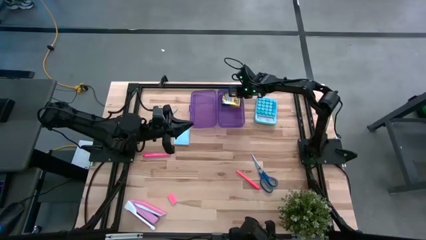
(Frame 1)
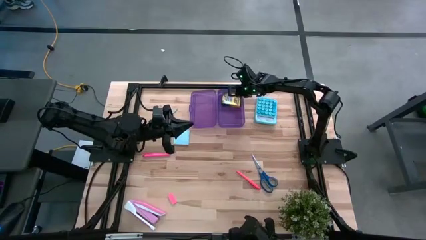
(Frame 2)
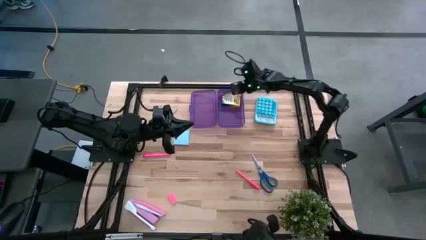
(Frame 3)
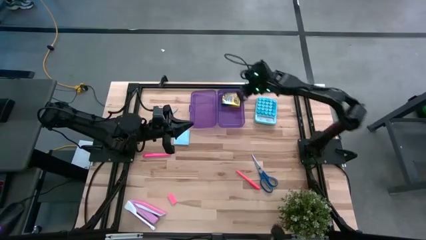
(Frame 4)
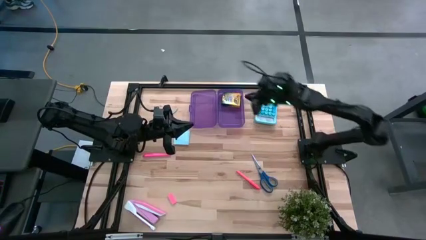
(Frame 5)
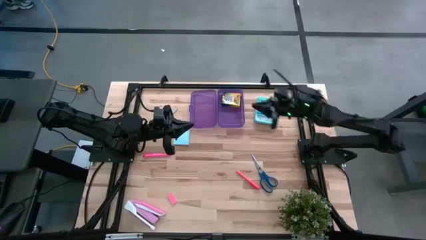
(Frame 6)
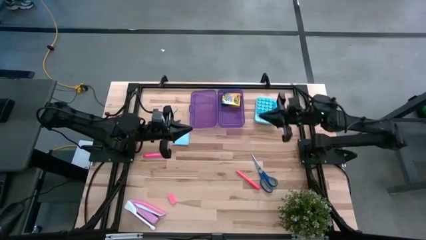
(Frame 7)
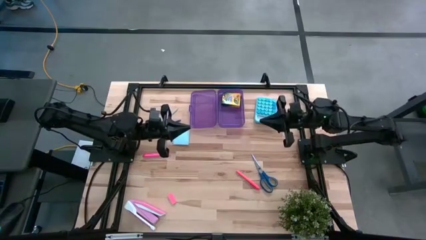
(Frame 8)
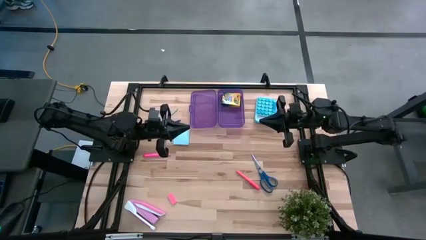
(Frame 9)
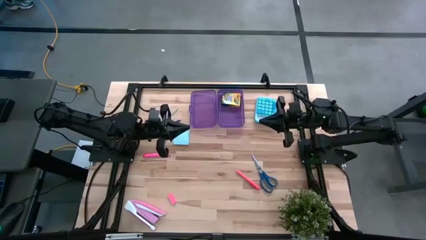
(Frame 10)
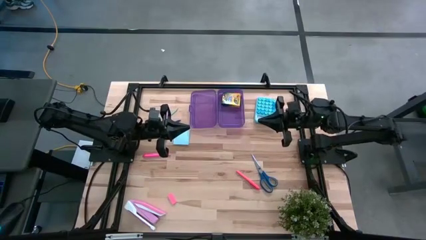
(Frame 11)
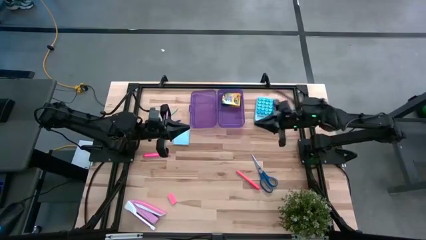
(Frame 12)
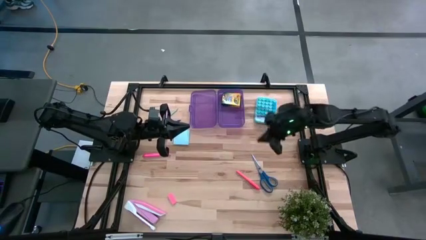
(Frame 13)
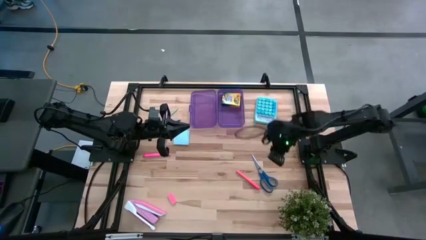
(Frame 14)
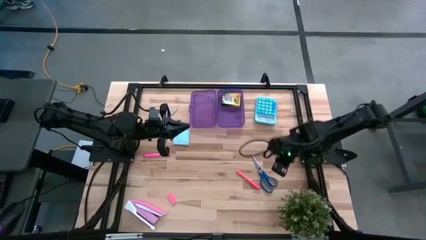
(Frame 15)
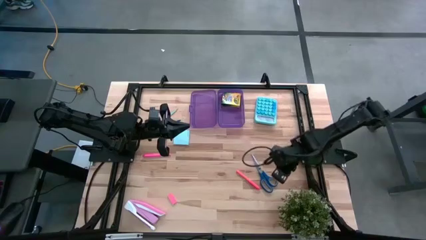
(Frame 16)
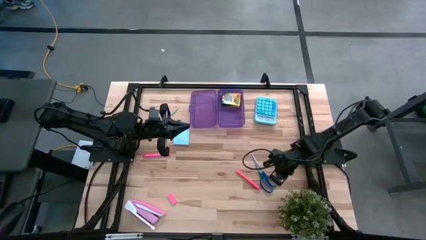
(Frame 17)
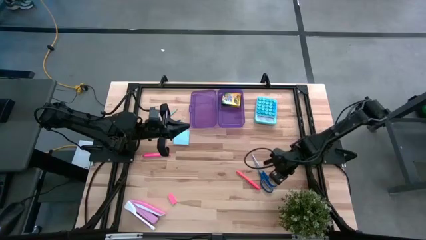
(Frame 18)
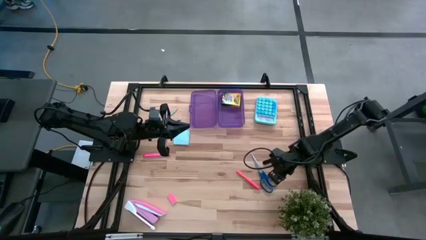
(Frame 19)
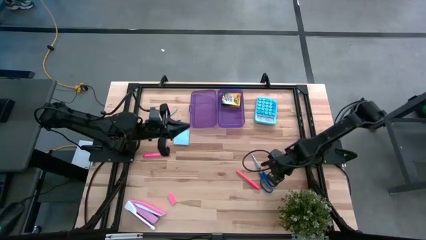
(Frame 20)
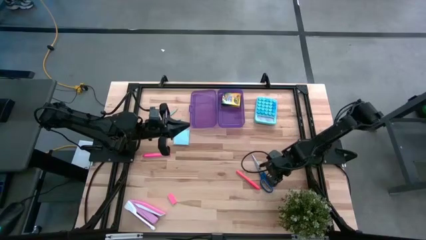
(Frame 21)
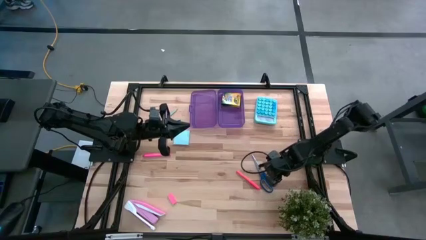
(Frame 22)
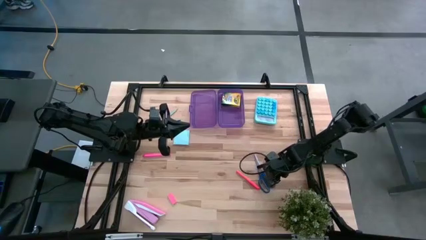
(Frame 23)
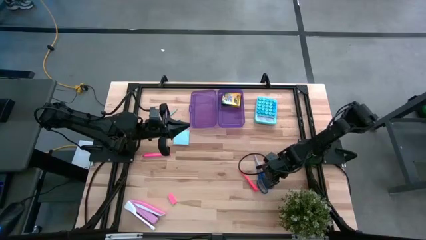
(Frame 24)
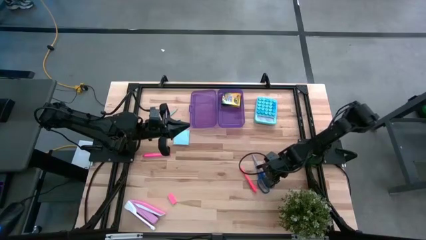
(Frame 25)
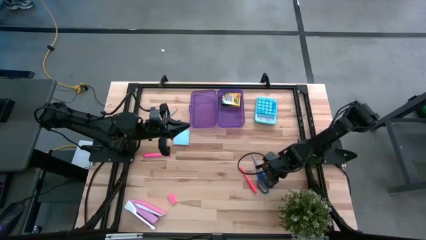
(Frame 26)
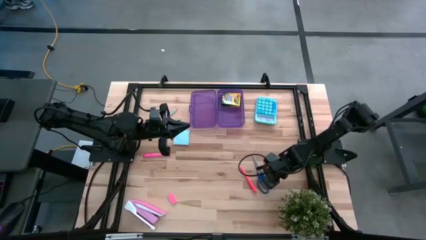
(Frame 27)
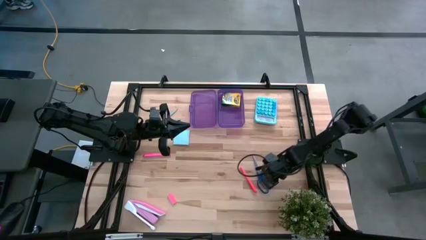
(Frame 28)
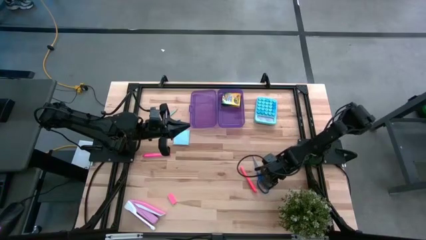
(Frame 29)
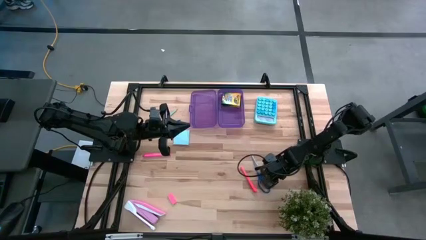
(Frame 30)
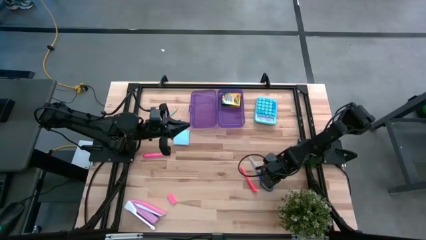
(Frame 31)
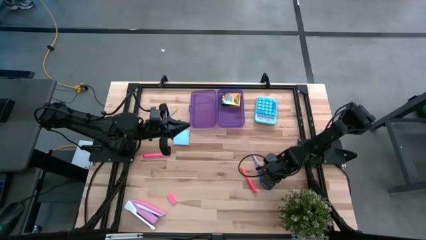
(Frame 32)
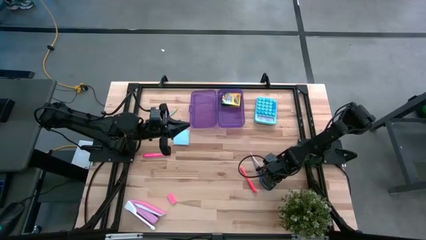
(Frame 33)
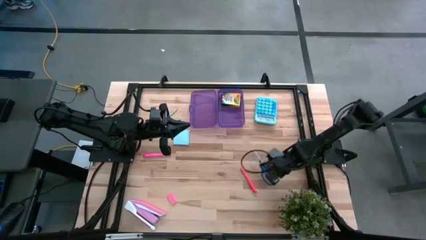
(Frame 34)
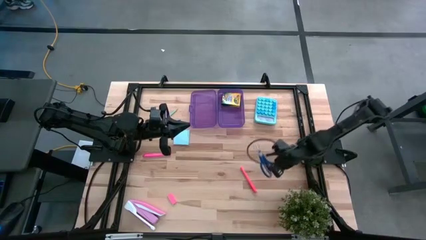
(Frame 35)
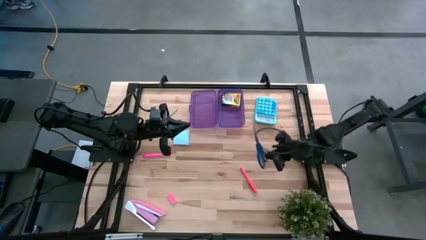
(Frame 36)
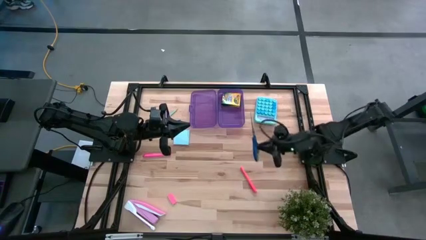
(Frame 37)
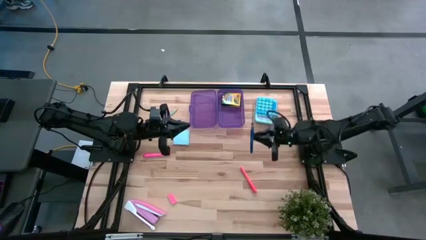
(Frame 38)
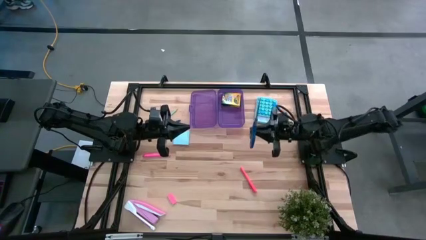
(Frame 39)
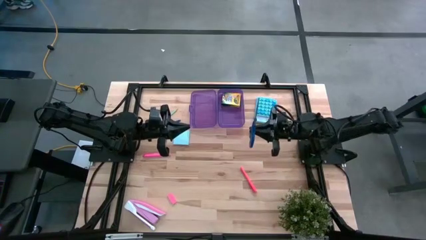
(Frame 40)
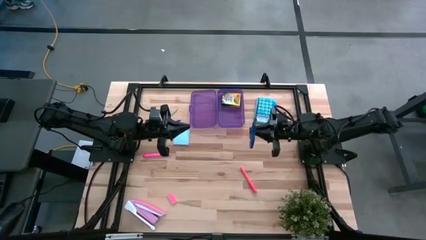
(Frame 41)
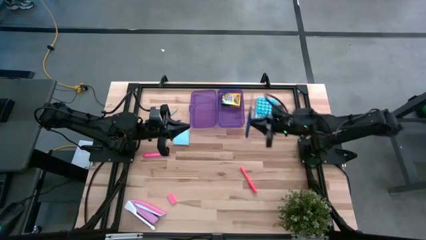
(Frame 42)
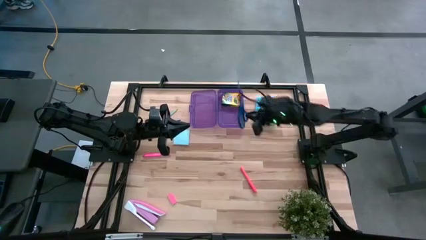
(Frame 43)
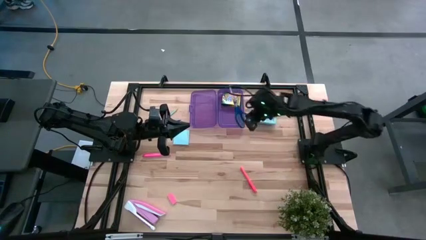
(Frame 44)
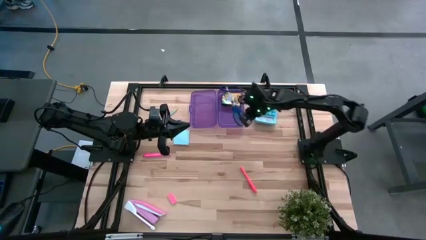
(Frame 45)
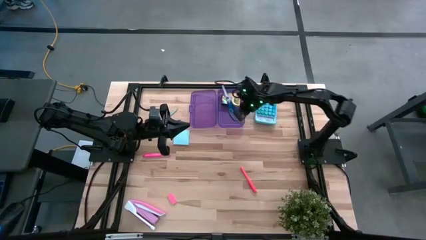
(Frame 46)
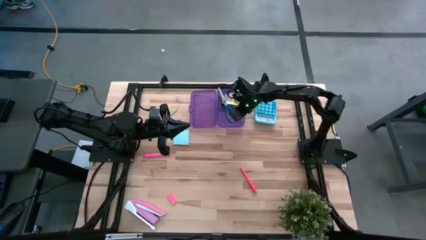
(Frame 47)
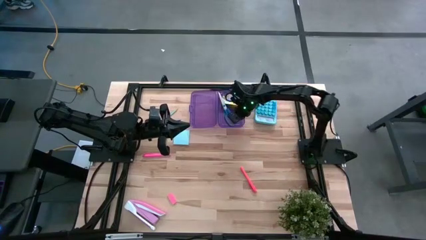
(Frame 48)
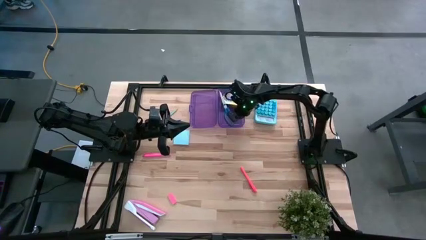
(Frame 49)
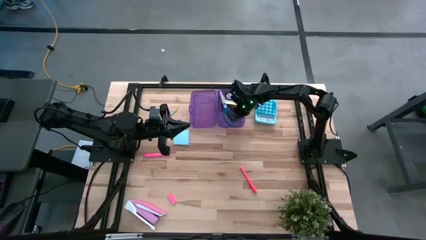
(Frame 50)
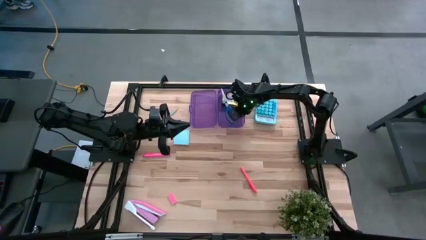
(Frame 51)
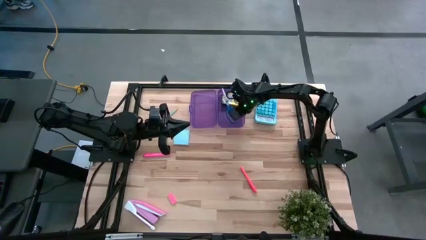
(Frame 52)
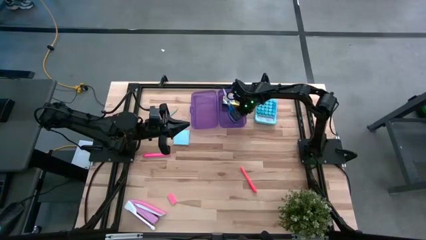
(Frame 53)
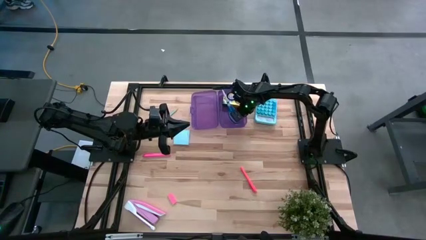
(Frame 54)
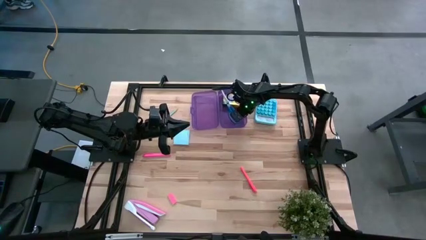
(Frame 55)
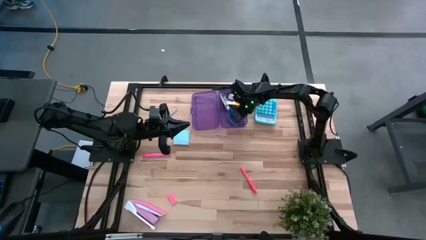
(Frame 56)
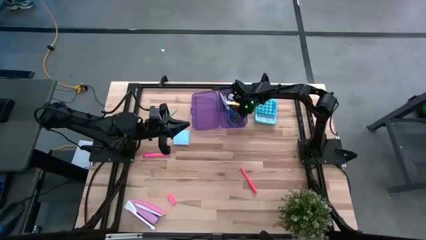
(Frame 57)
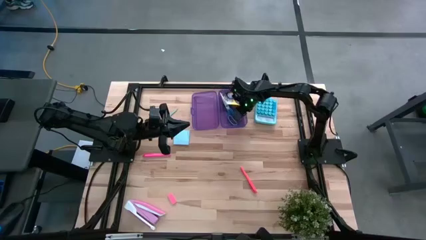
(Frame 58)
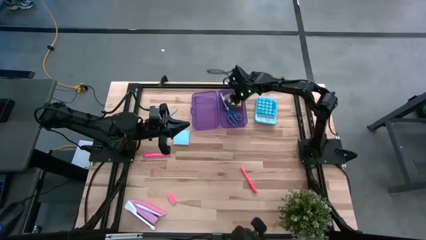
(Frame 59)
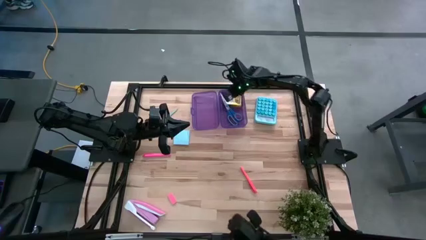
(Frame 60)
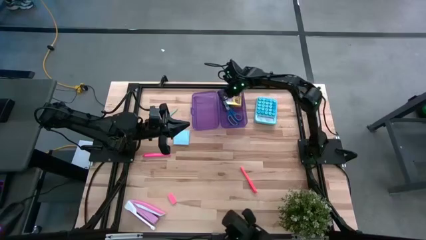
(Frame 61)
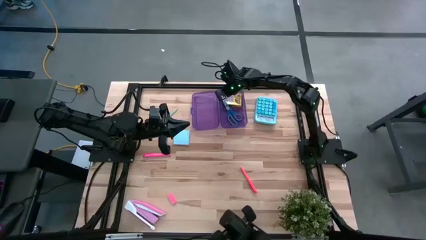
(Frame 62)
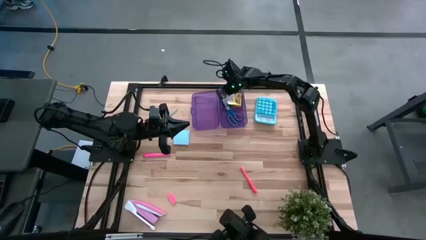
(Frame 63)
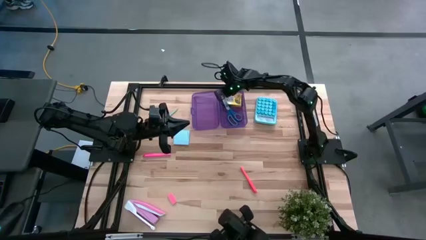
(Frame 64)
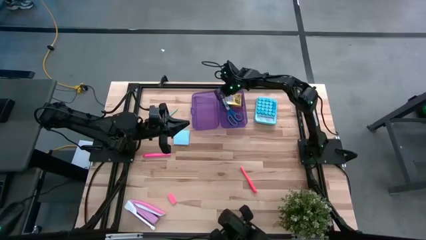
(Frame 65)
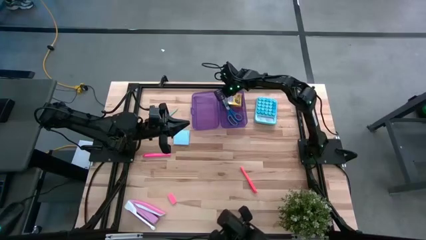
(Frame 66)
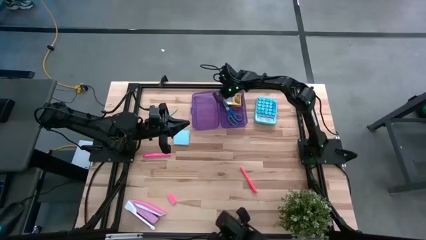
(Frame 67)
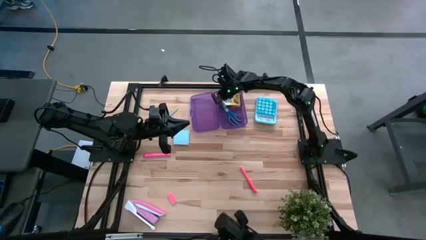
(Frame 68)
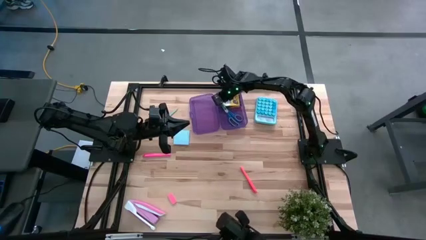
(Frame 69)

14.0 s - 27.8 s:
Task: Pack school essentials
Put the blue scissor into the purple supply box

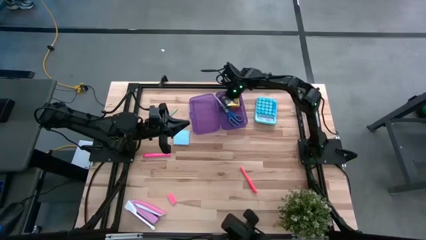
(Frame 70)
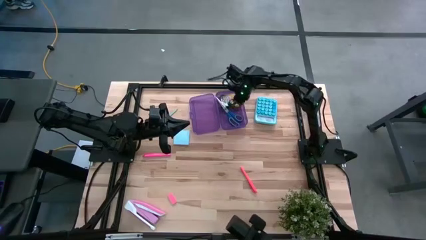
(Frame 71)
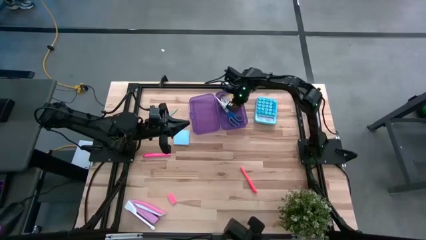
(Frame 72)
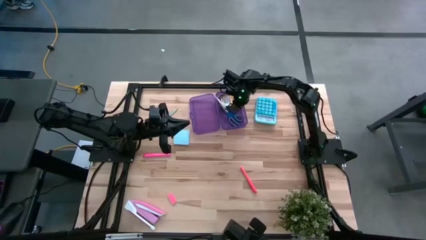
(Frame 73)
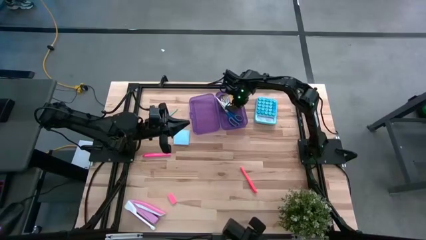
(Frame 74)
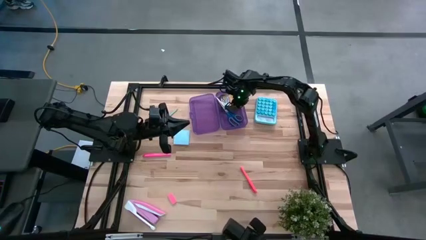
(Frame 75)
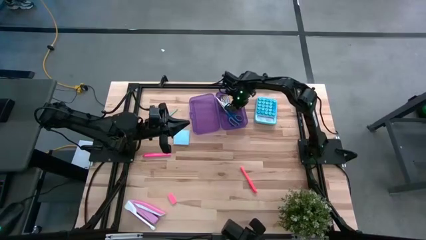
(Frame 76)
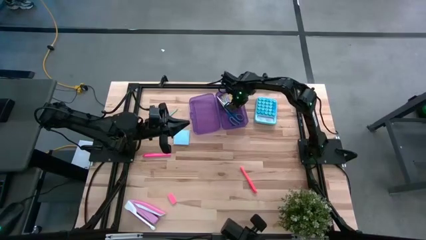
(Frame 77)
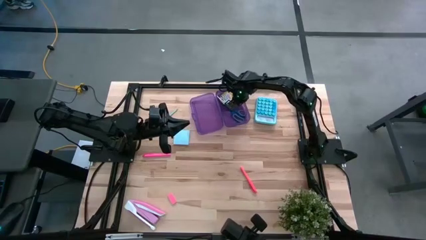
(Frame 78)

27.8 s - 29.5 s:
Adjust the yellow crayon box into the purple supply box

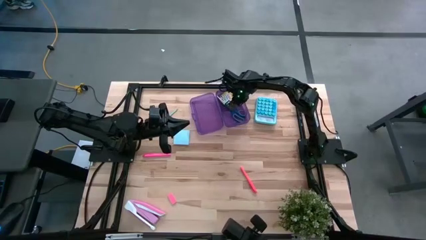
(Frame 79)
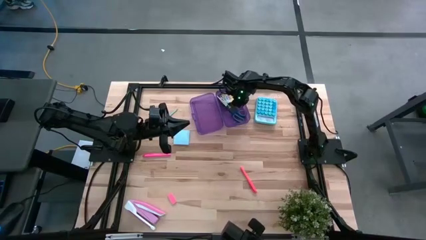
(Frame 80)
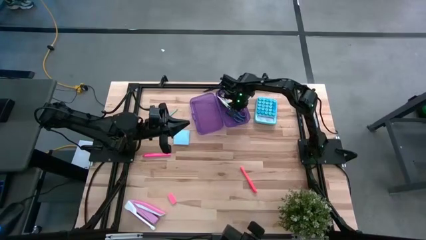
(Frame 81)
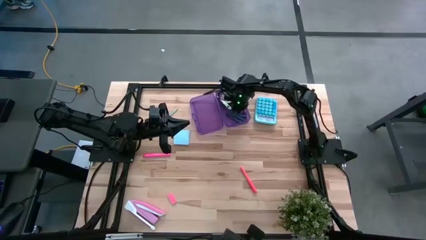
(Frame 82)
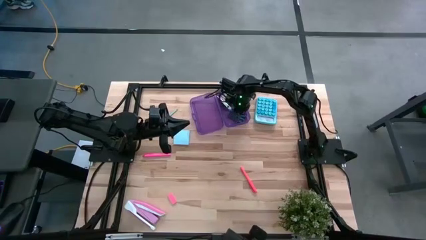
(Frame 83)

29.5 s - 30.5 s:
Adjust the blue scissors into the purple supply box
